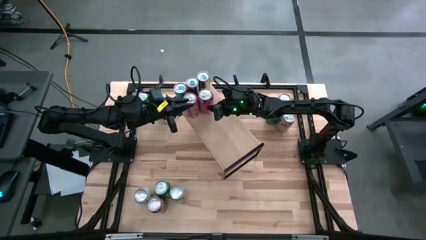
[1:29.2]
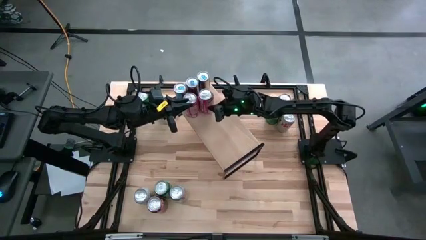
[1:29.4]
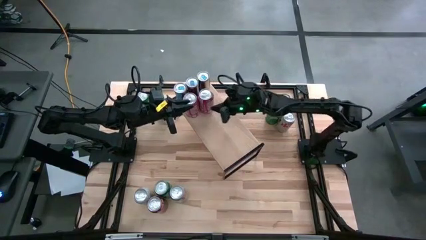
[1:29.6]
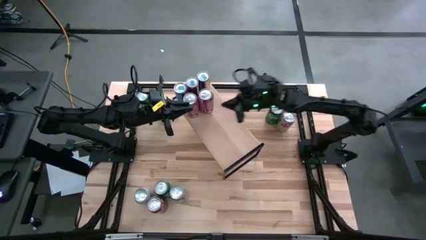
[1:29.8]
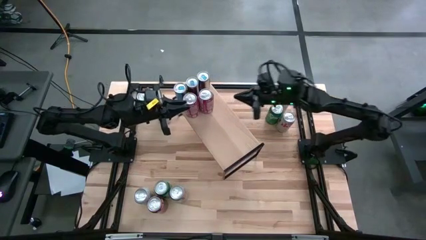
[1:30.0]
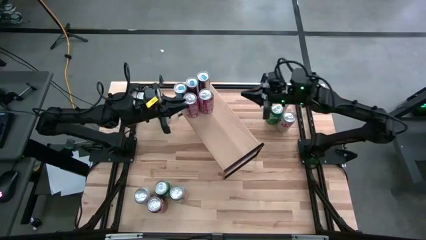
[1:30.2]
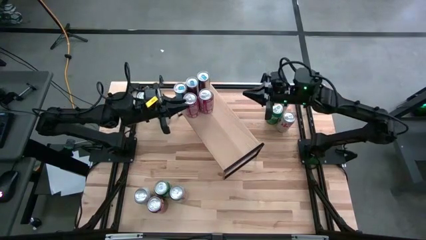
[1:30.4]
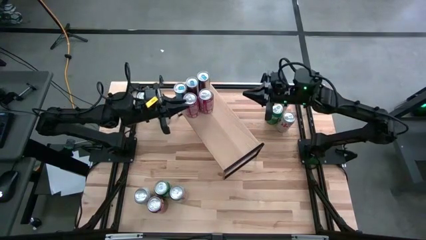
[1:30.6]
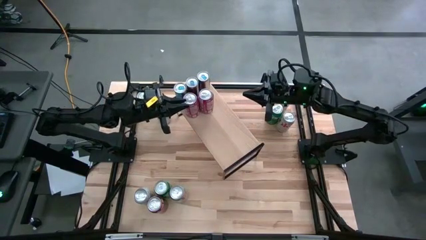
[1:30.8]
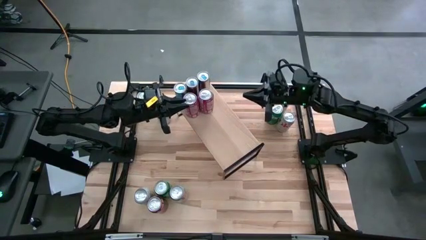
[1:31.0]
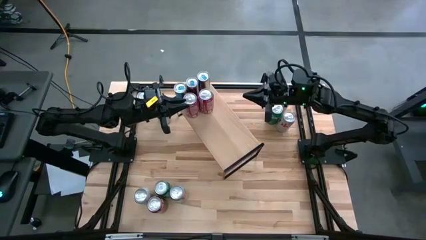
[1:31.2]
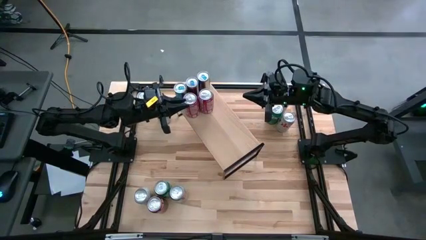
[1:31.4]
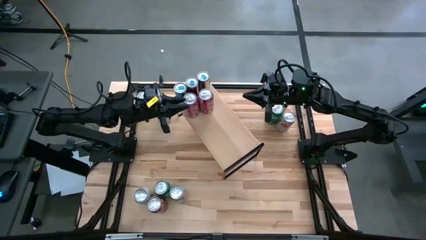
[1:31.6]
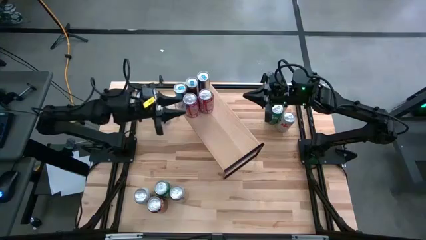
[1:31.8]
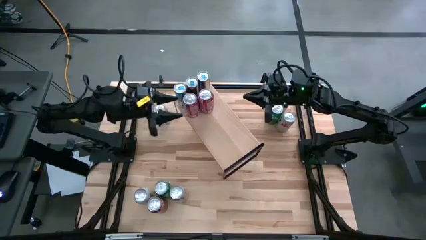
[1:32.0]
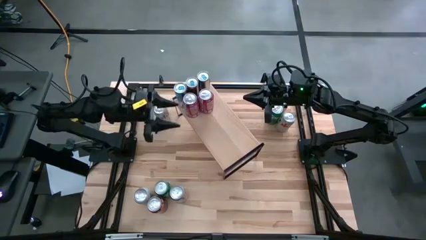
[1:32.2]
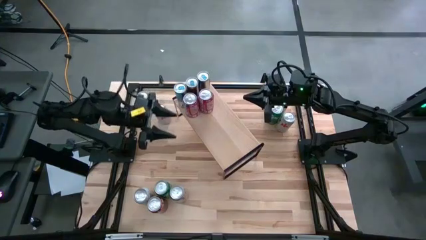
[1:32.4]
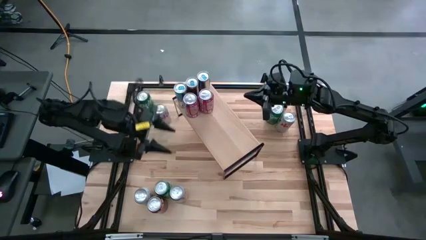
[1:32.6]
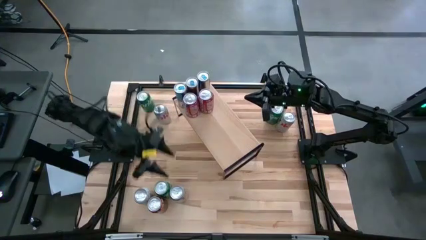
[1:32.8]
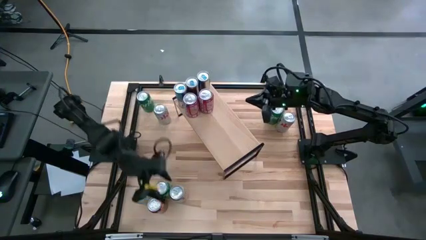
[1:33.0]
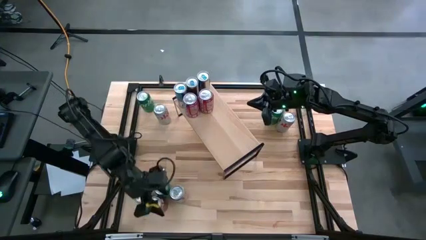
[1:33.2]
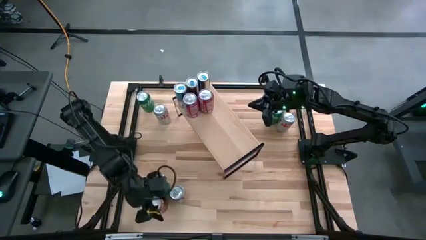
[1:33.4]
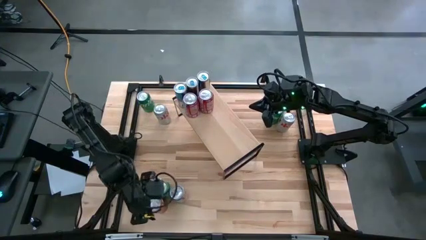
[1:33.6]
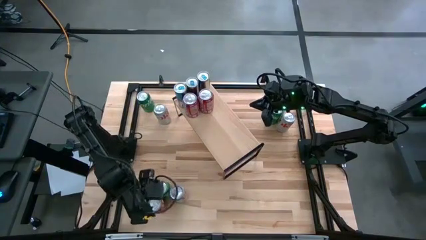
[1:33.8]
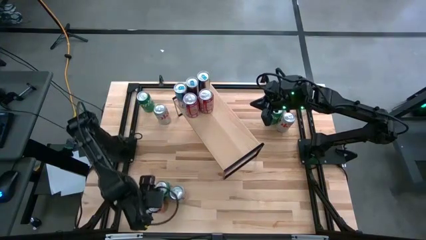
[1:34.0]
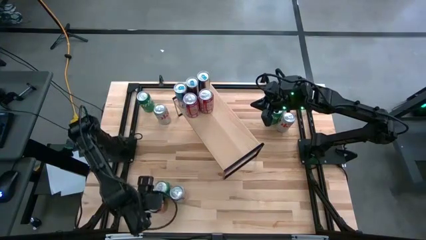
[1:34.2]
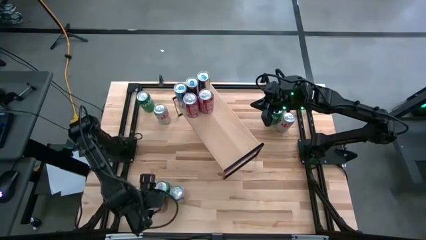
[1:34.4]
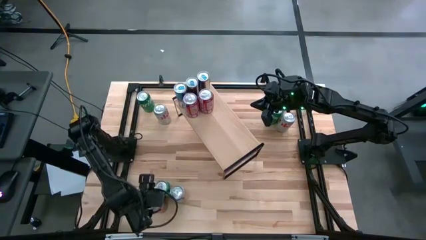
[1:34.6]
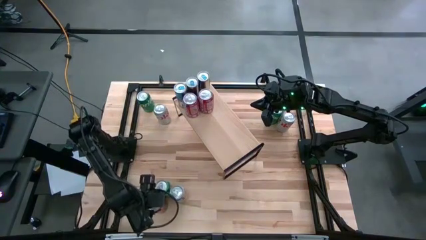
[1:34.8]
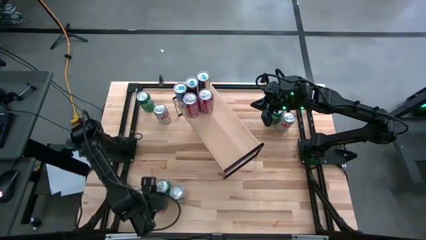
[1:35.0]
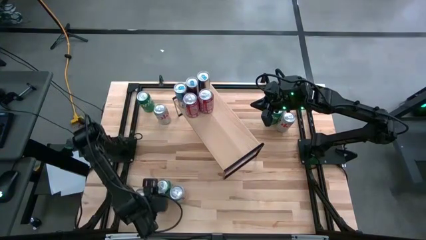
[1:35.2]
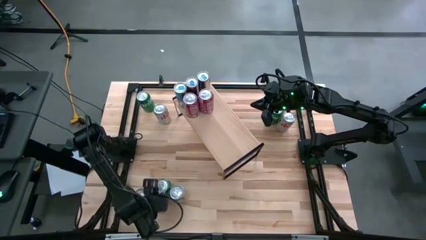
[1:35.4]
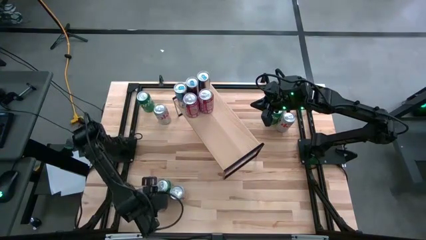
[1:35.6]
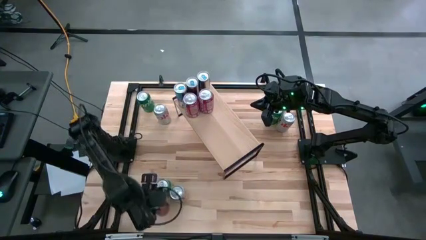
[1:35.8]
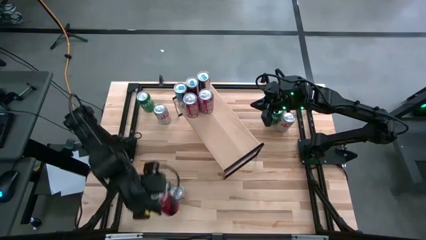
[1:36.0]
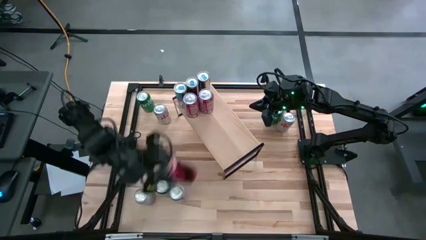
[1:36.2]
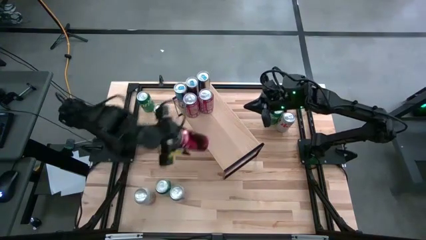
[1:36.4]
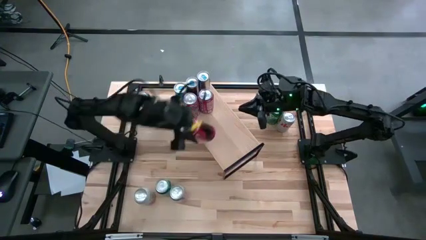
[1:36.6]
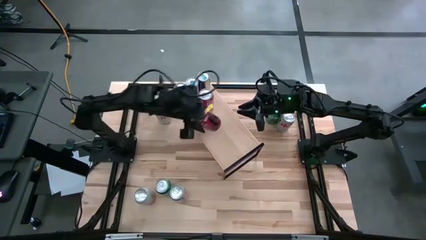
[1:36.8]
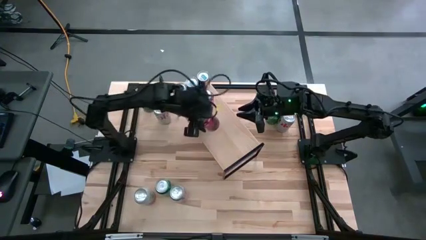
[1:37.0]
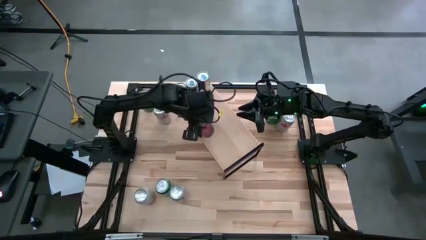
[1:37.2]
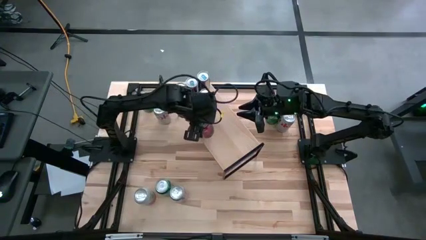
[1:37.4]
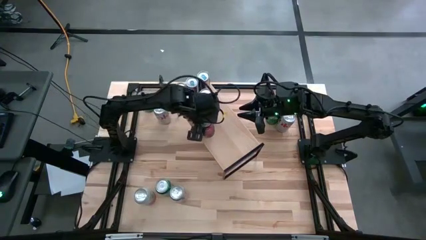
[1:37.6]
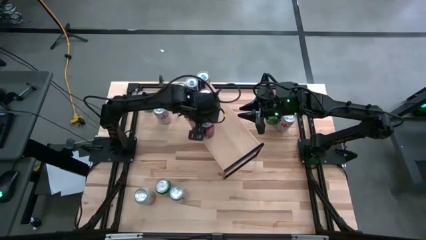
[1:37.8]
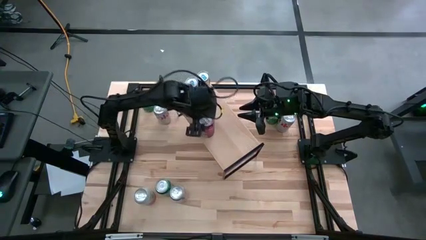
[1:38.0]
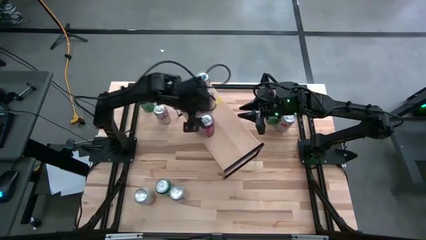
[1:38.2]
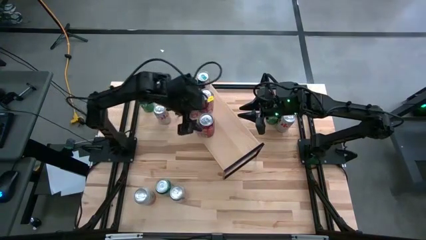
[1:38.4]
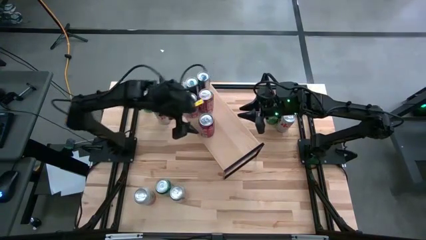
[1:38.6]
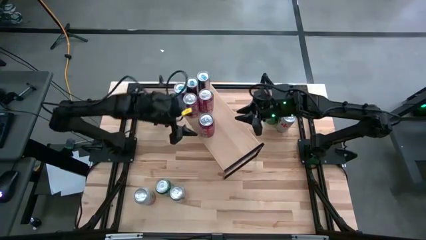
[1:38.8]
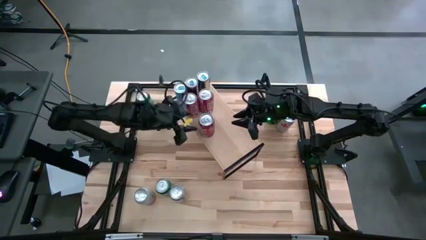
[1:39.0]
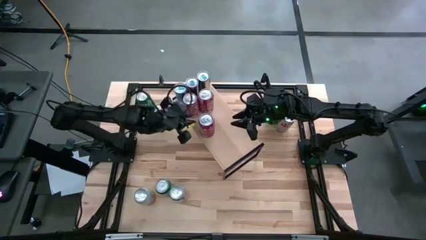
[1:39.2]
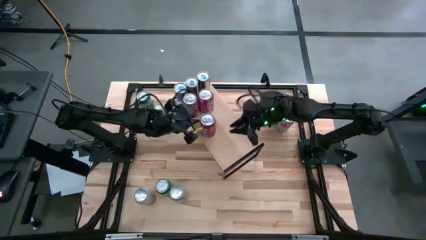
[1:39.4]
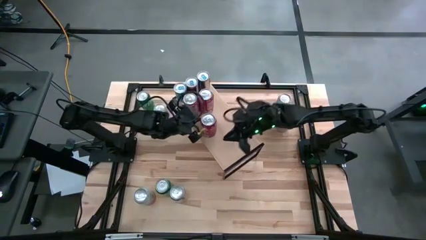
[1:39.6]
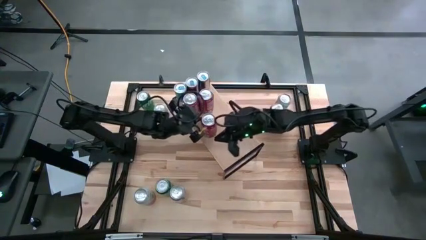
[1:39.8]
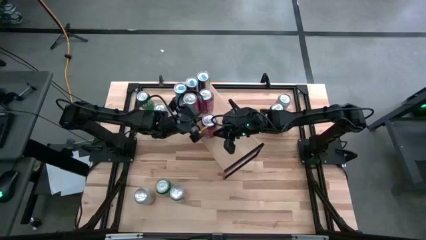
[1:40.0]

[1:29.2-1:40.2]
Task: Place canned beverage on shelf
Put the red soda can on the shelf aligned with the other red soda cans
